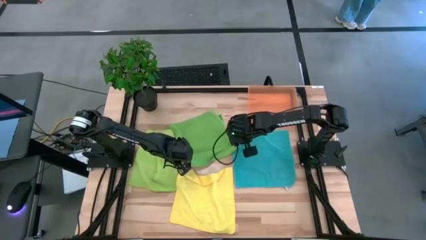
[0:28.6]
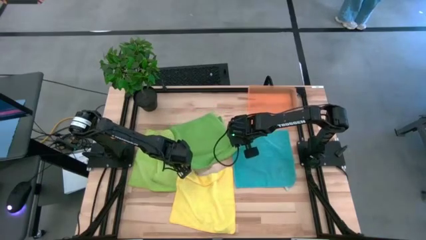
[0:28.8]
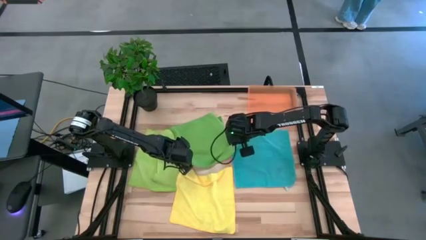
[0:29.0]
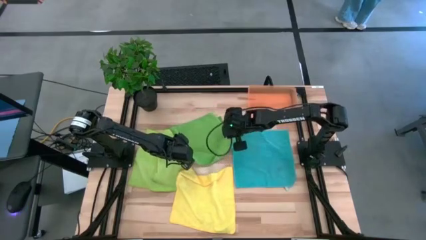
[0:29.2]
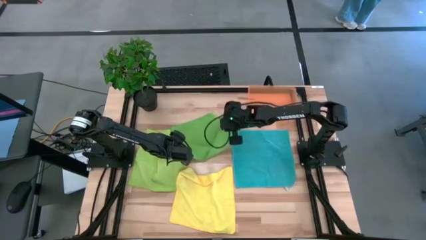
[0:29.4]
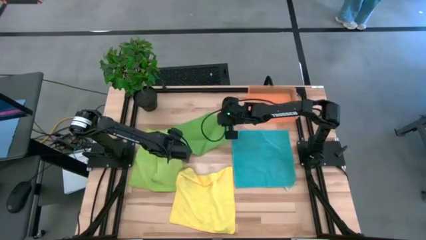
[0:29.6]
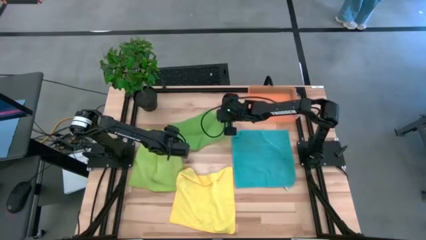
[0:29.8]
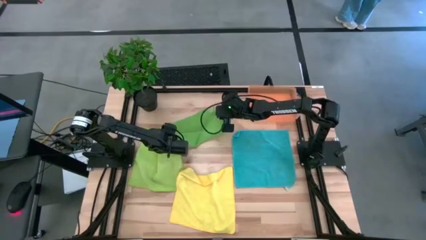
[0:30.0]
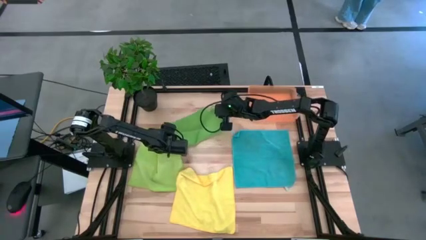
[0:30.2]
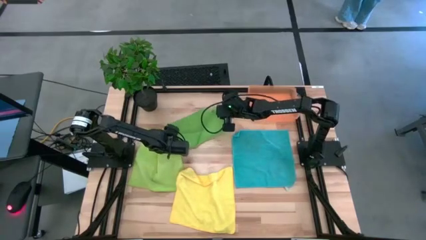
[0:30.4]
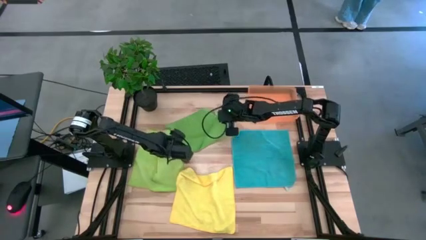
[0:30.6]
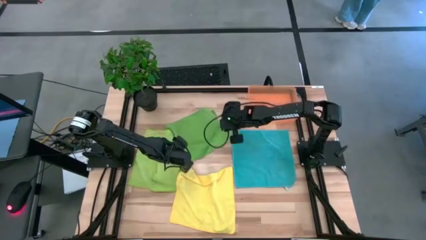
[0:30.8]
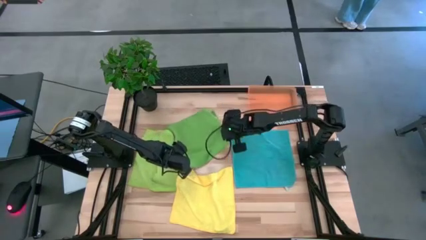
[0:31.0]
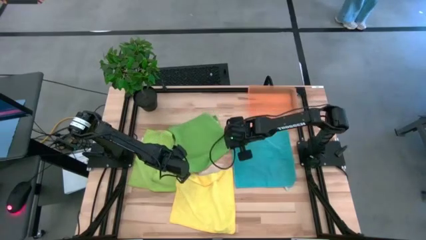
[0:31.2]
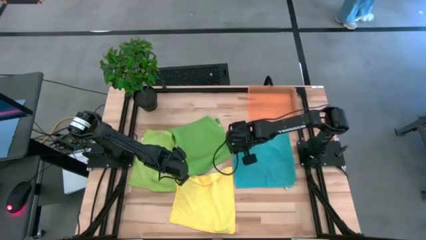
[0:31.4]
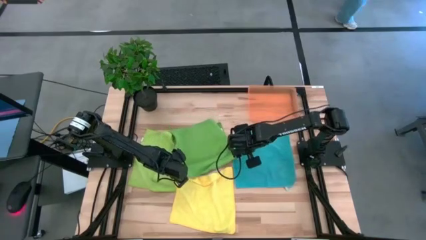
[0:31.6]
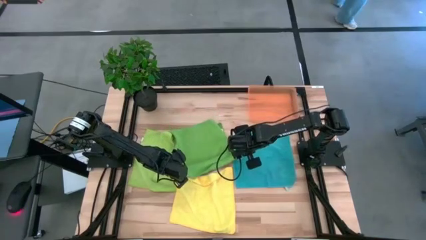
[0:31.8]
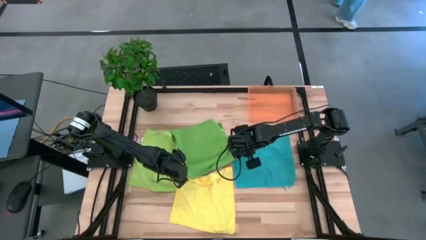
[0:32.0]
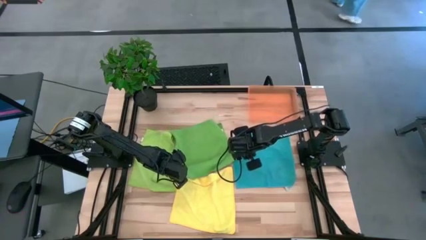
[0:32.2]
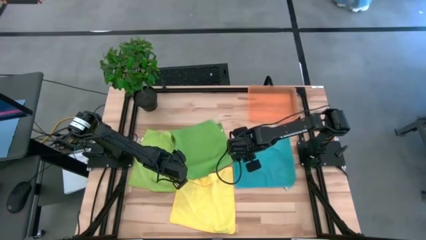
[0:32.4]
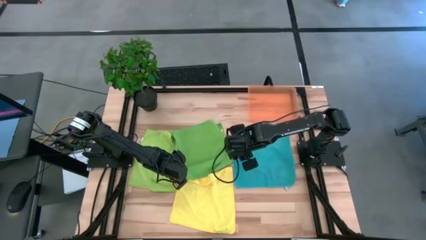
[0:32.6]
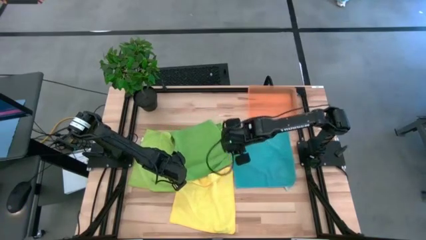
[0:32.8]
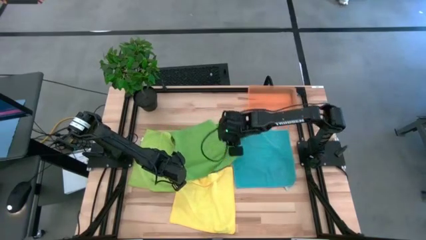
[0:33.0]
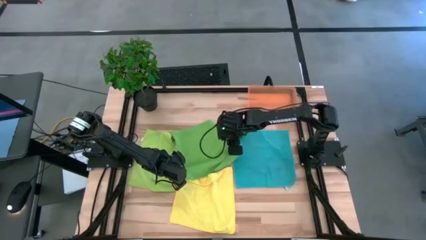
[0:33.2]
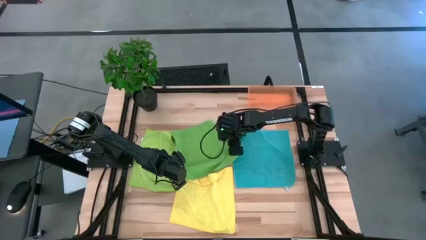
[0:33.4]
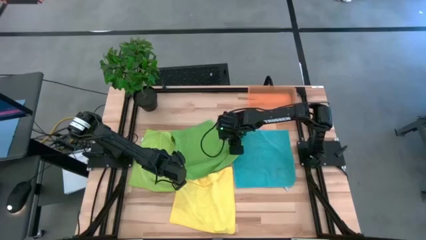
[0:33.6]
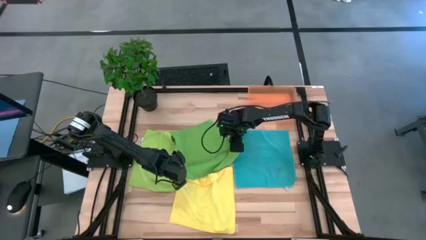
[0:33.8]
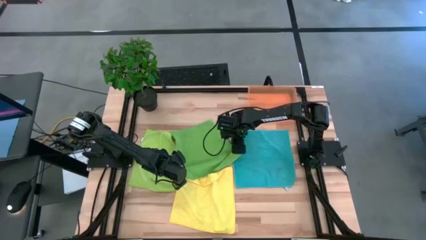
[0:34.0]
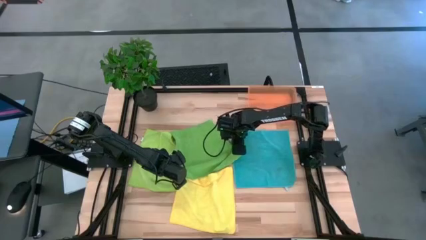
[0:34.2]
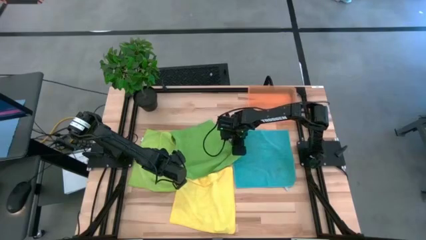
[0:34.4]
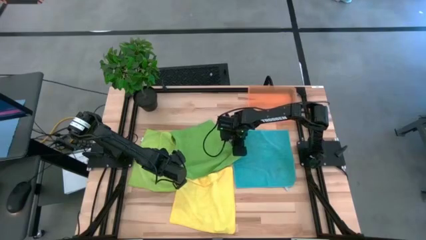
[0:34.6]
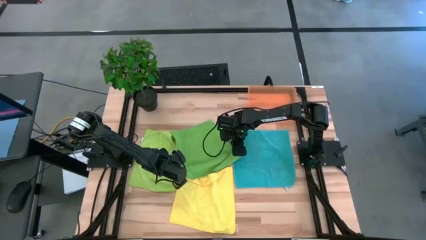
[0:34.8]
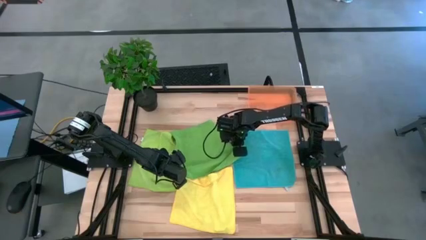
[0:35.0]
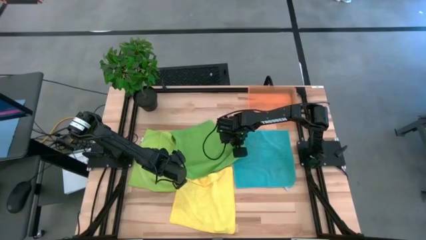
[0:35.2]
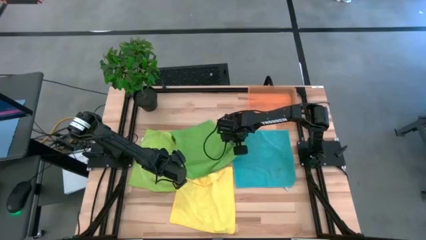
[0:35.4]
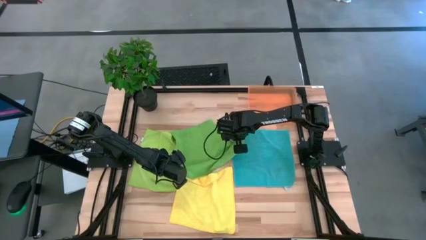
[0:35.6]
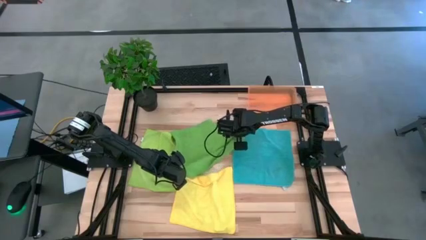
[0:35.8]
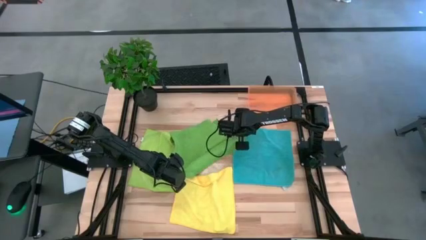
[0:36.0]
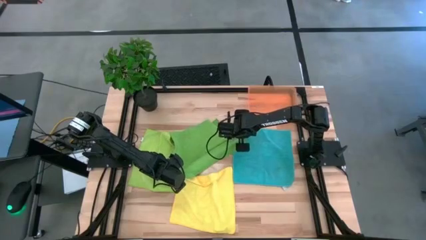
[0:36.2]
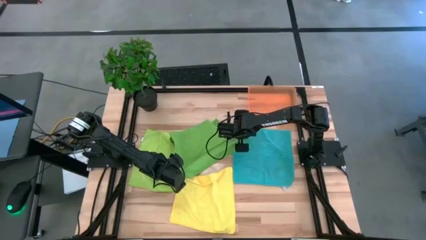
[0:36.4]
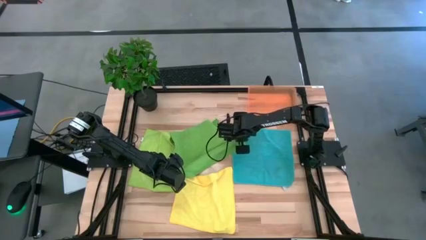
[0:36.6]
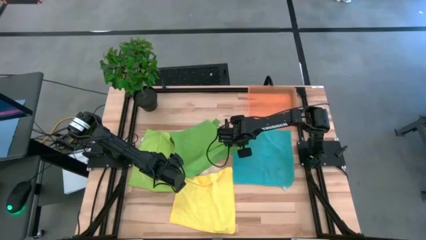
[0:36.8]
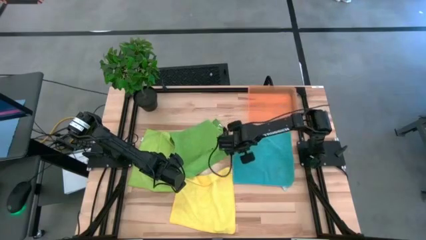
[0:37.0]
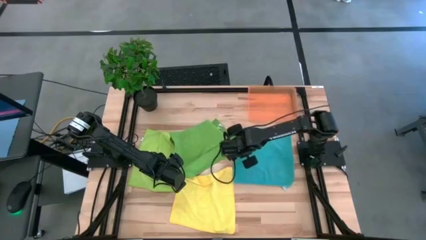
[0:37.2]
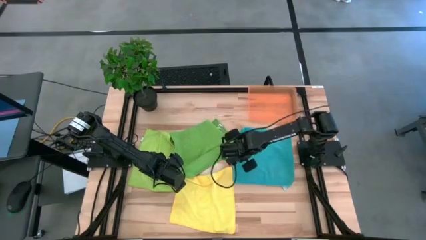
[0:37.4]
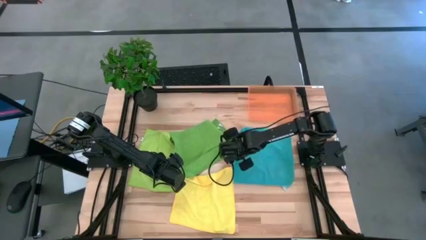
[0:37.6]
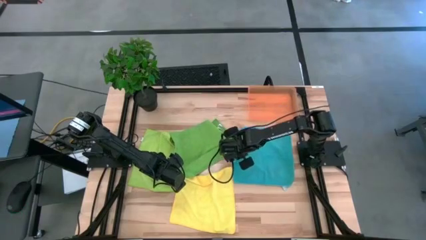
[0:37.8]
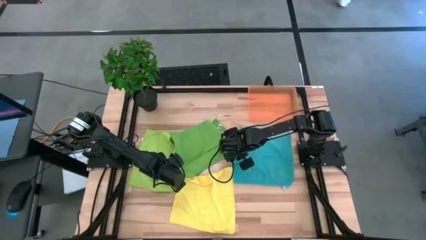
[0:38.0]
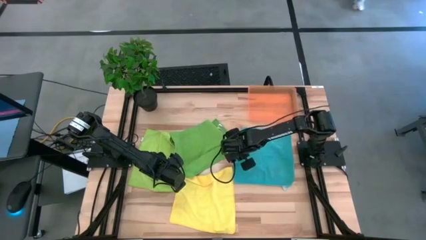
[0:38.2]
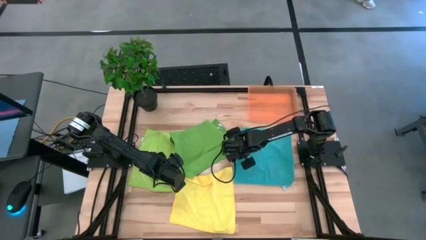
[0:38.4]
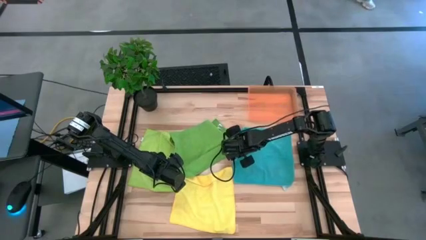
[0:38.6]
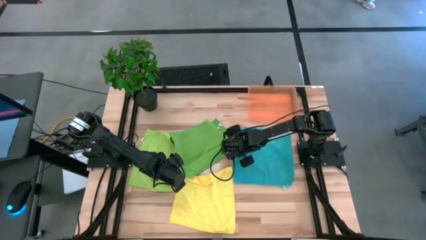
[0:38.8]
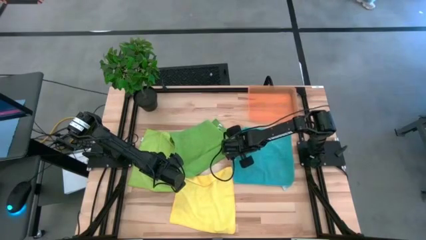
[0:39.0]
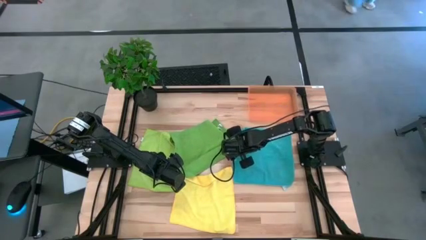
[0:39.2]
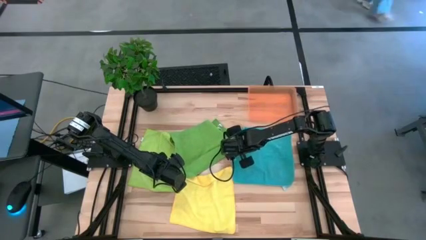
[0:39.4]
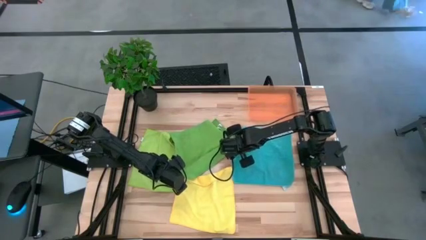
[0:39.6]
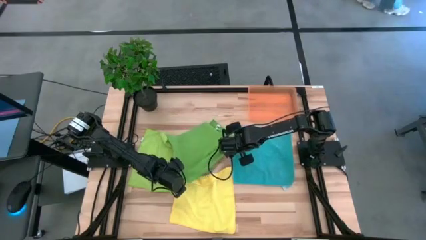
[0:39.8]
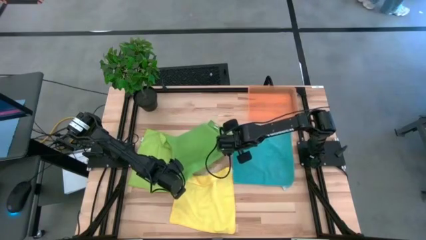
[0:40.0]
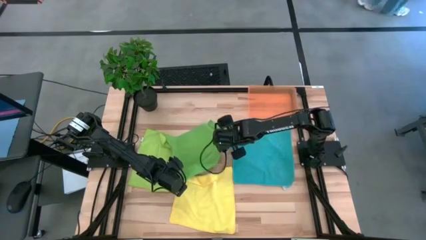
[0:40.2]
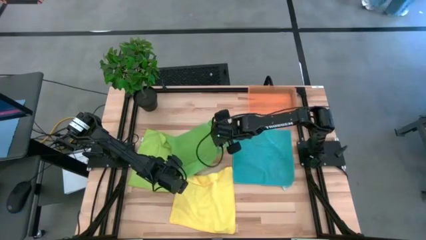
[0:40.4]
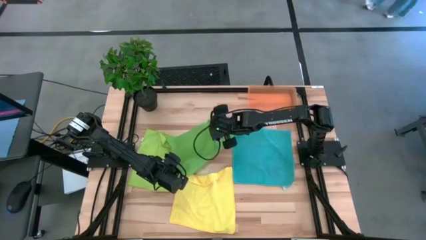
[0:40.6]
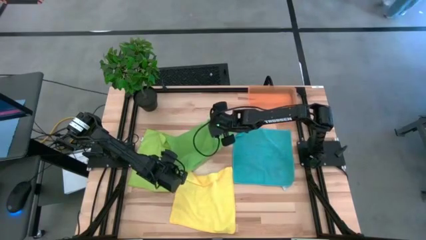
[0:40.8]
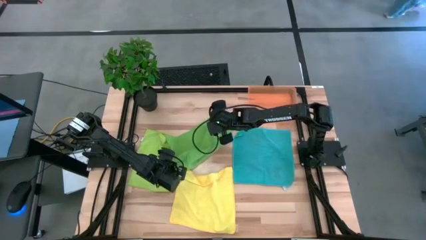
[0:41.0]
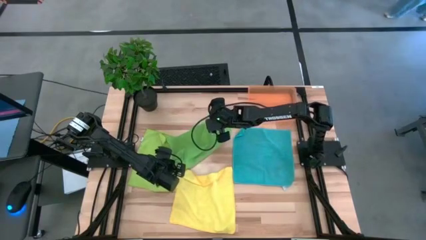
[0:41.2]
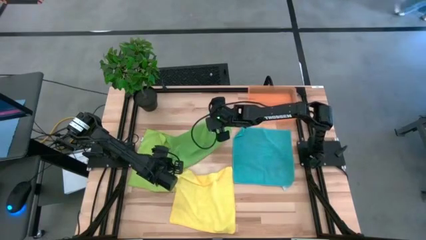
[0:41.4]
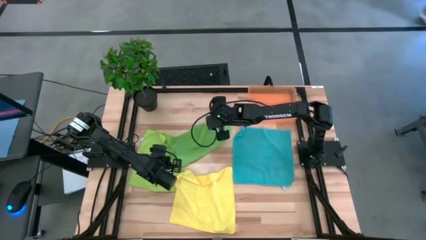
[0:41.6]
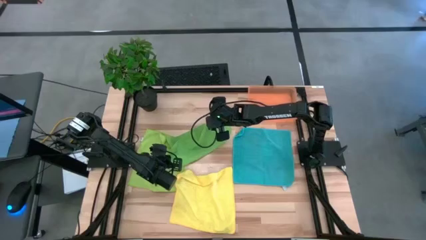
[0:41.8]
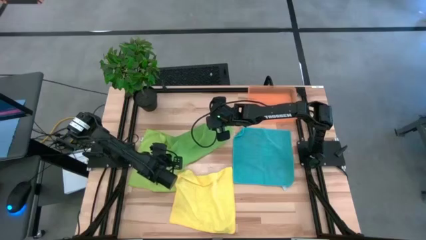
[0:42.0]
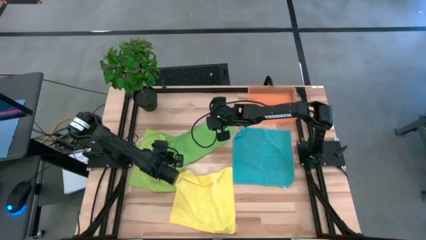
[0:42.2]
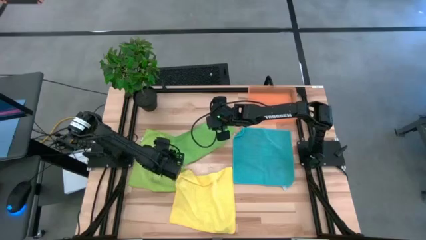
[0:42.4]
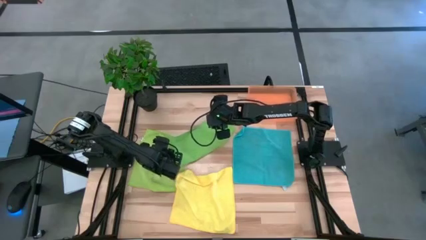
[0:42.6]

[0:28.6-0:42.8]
Task: Fold microfiber towels
Fold the green microfiber towel
